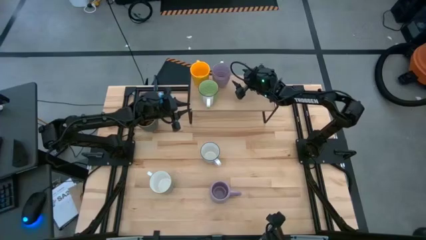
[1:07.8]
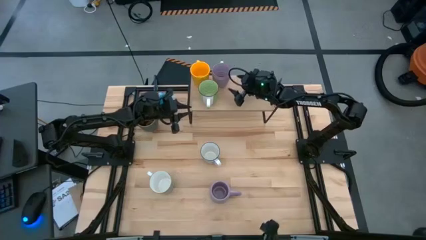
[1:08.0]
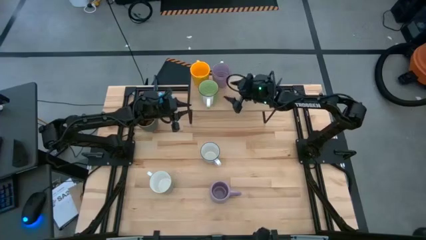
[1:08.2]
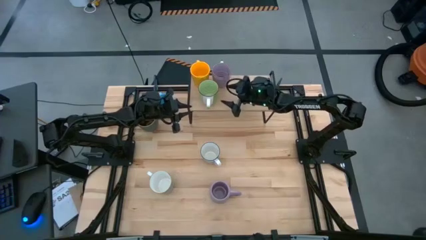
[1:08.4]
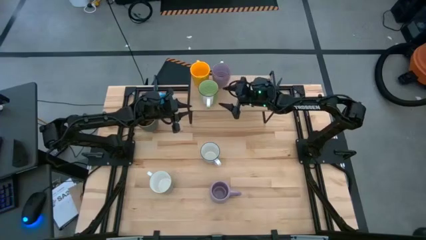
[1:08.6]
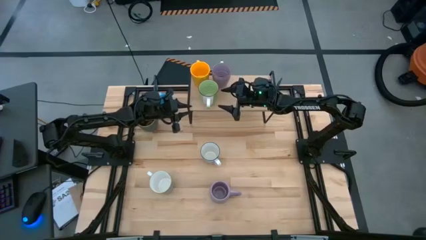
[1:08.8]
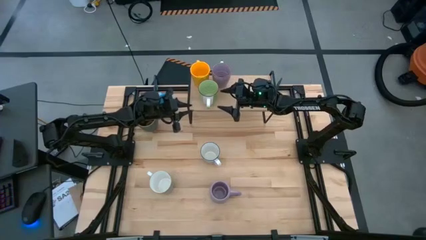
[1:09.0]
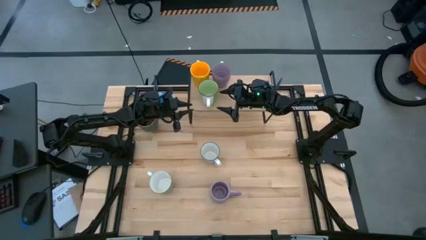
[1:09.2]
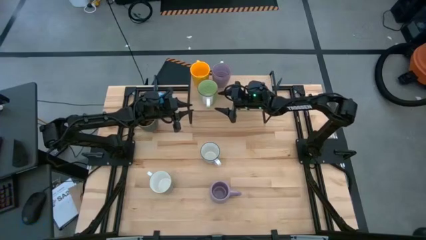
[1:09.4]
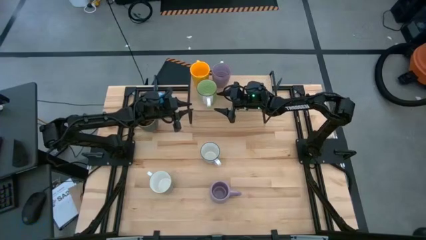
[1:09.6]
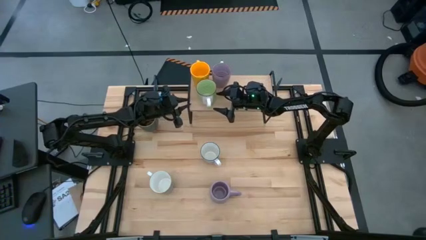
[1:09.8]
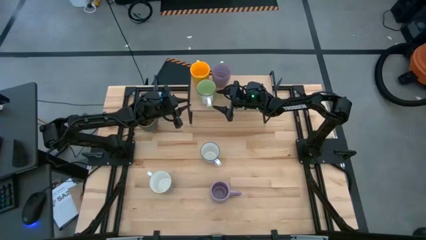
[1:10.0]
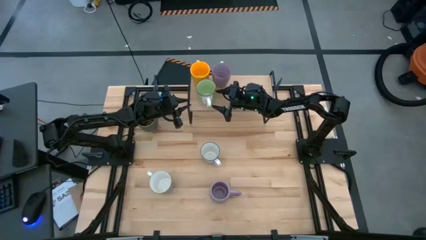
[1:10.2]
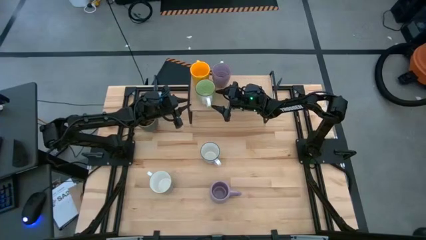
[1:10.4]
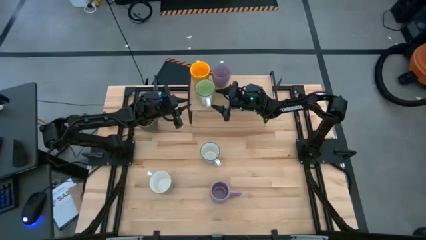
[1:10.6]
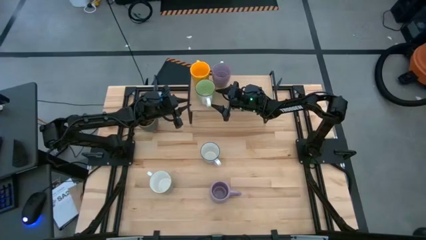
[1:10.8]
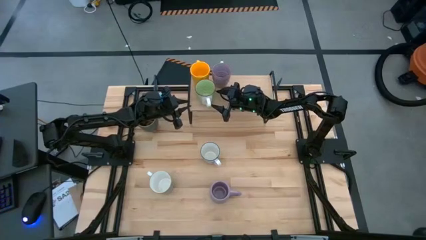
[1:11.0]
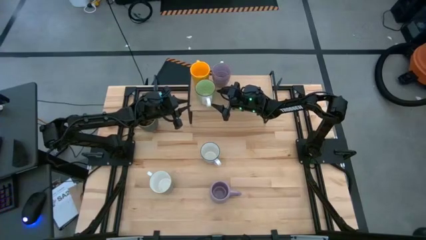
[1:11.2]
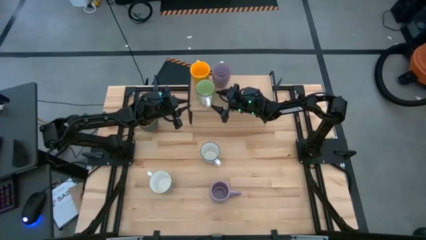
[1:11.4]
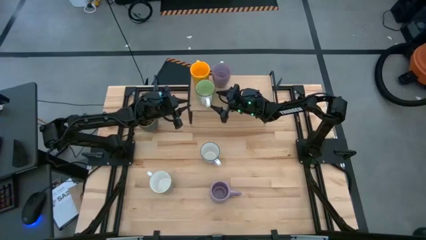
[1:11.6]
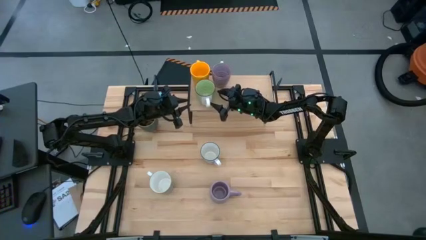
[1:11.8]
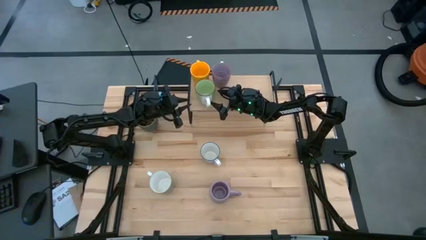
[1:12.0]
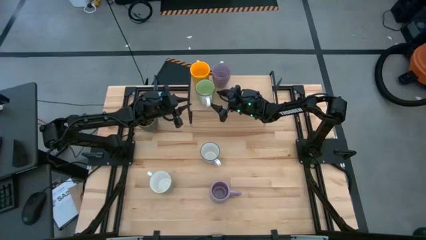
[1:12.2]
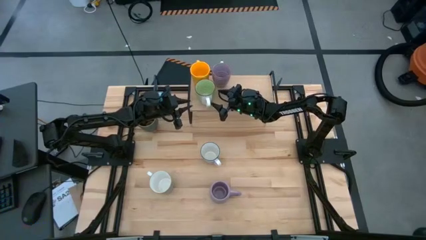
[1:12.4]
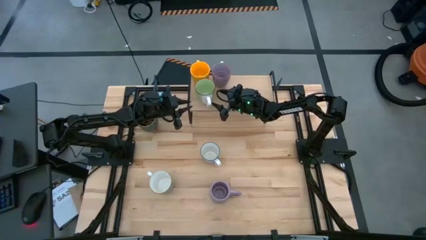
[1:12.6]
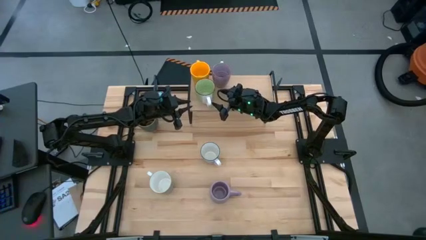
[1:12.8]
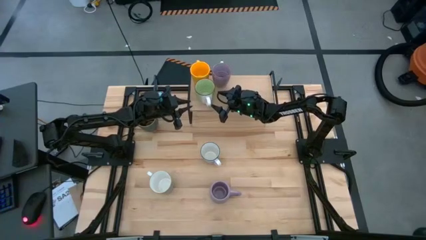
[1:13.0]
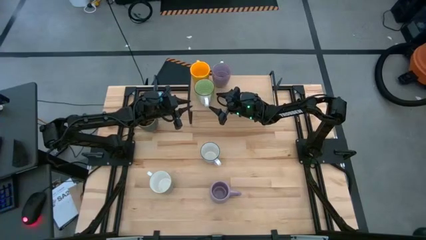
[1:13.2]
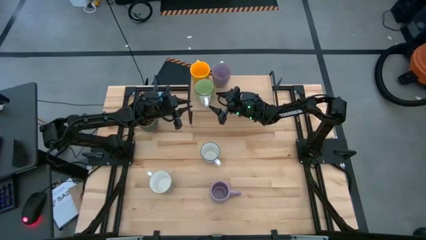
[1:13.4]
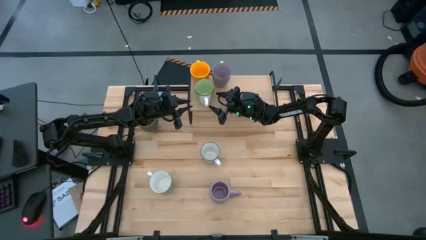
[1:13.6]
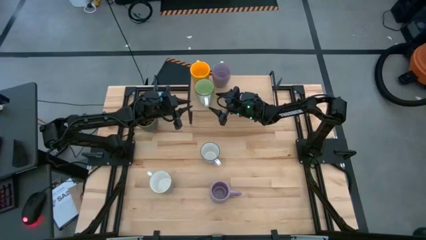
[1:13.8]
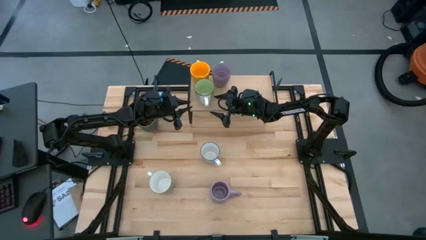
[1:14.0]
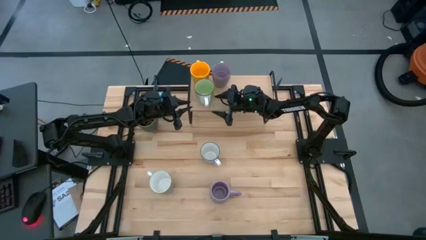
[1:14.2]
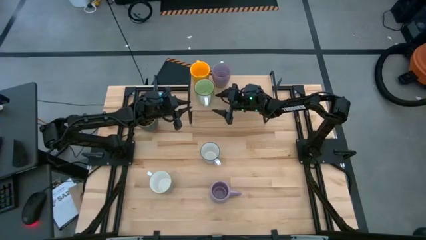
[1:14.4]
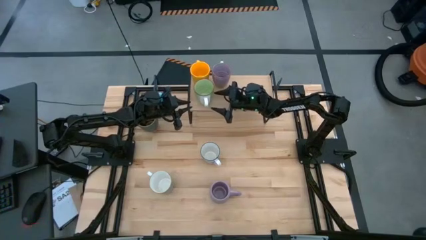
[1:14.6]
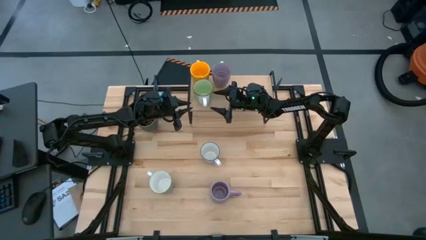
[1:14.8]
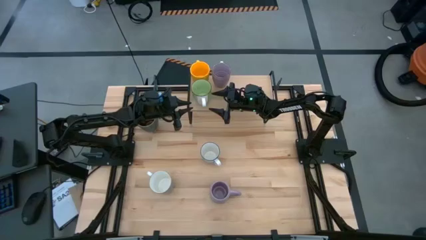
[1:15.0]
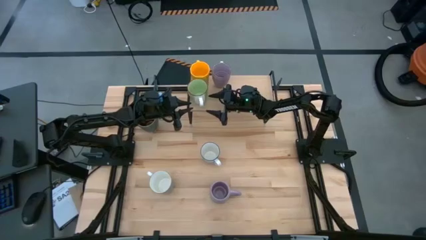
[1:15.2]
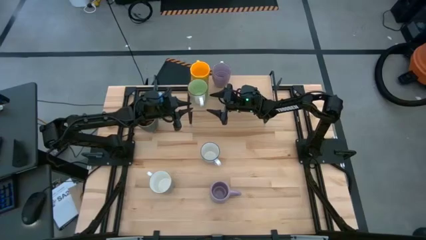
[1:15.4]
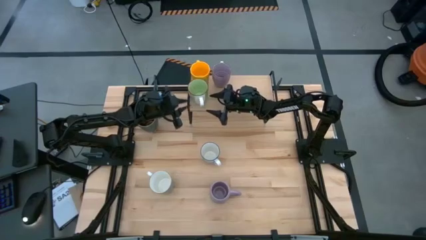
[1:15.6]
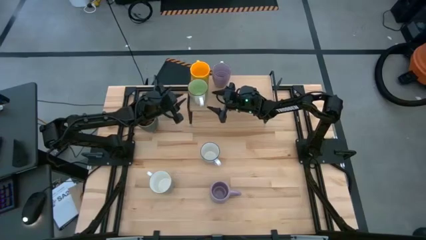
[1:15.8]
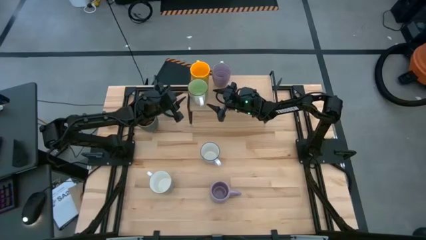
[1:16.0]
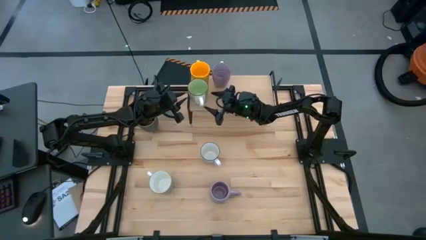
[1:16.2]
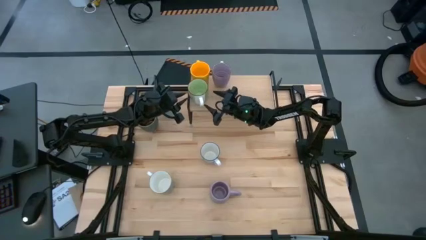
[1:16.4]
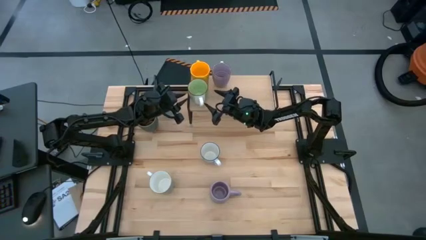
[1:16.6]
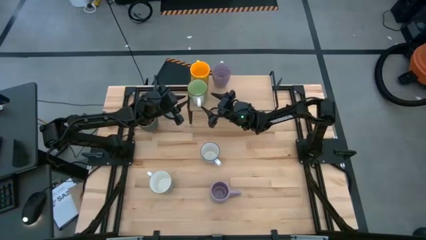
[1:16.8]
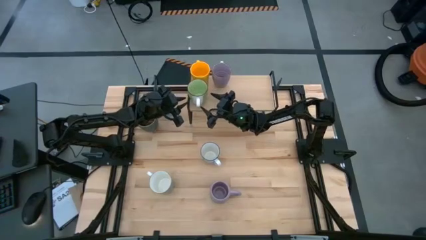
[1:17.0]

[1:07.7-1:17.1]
Task: Place coffee mugs
Adjust the green mug on the shelf

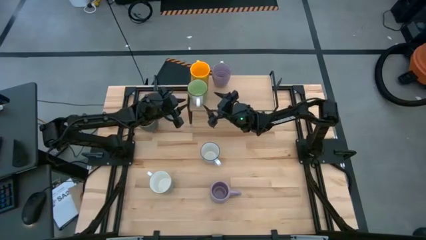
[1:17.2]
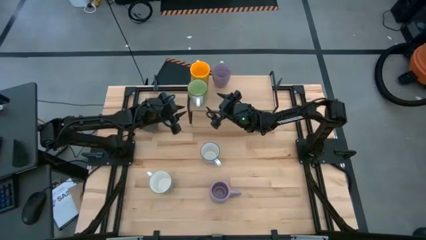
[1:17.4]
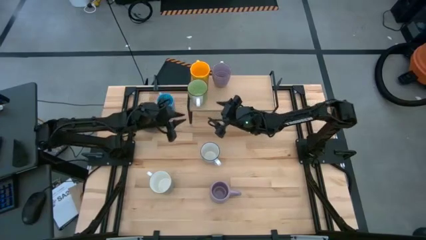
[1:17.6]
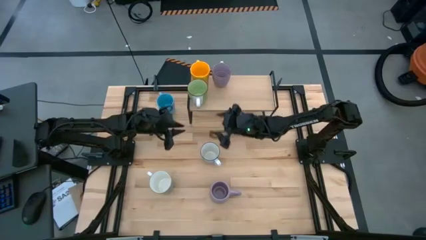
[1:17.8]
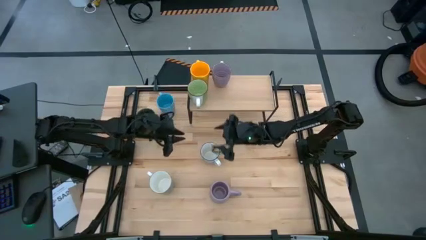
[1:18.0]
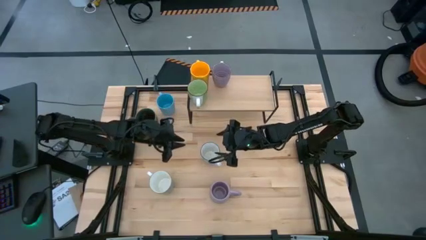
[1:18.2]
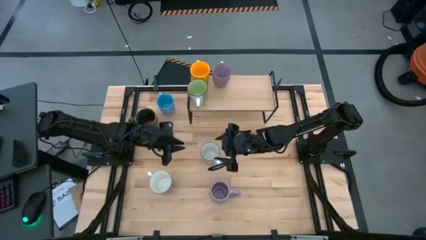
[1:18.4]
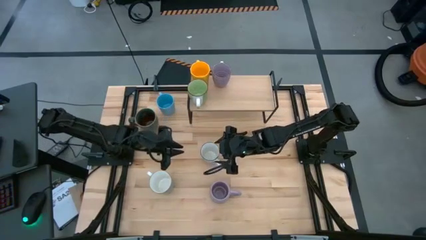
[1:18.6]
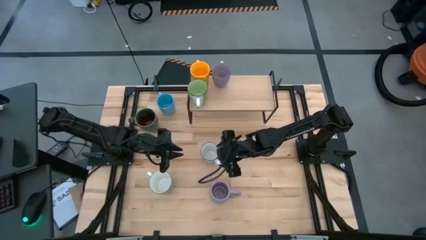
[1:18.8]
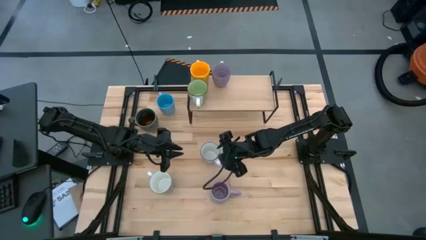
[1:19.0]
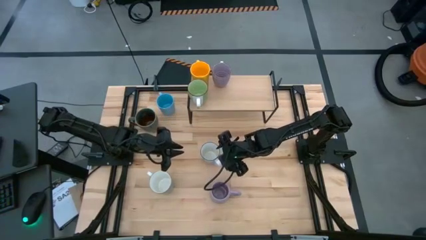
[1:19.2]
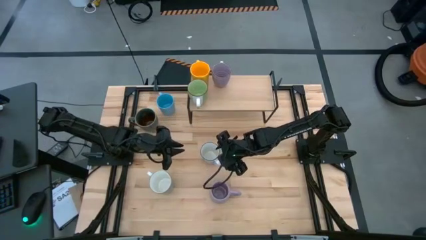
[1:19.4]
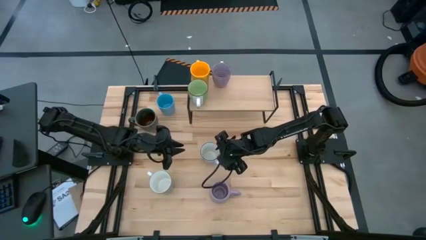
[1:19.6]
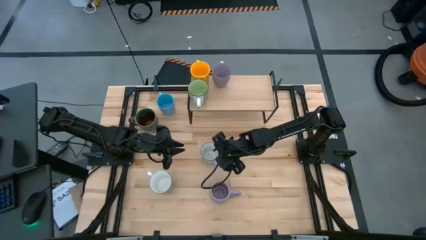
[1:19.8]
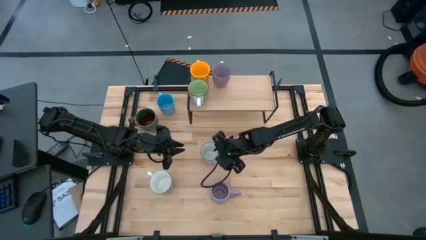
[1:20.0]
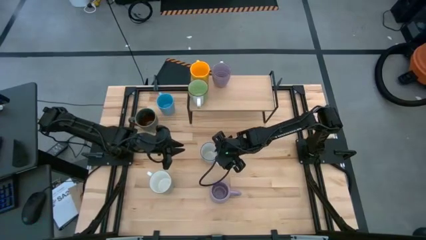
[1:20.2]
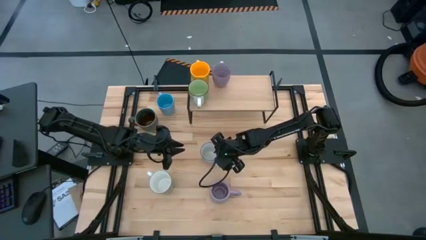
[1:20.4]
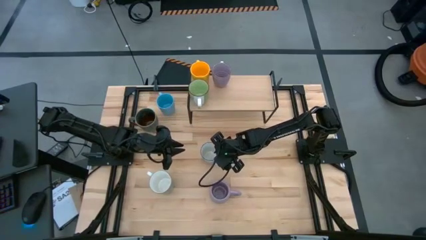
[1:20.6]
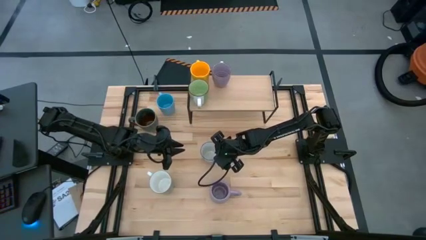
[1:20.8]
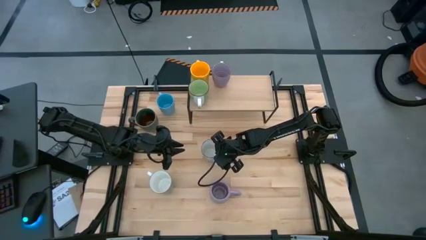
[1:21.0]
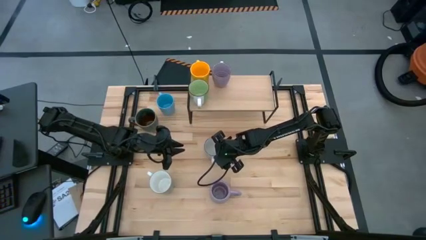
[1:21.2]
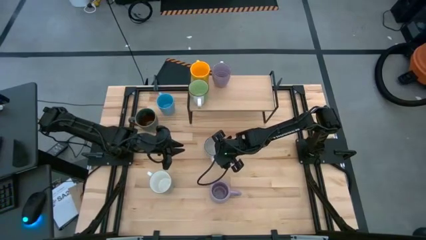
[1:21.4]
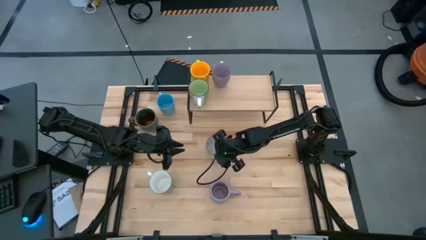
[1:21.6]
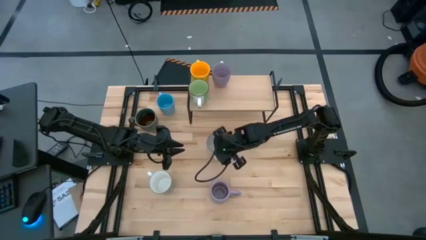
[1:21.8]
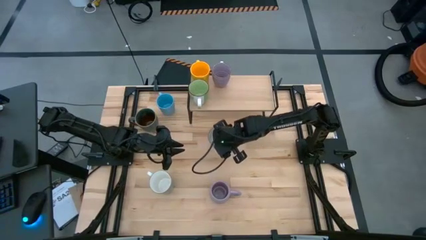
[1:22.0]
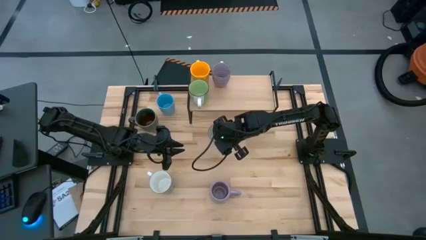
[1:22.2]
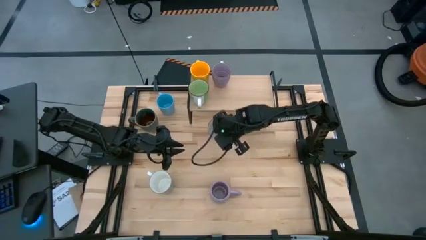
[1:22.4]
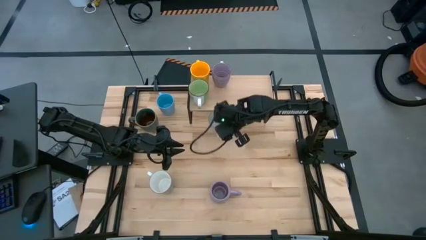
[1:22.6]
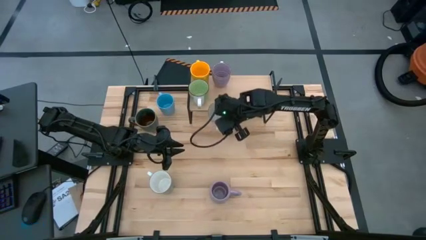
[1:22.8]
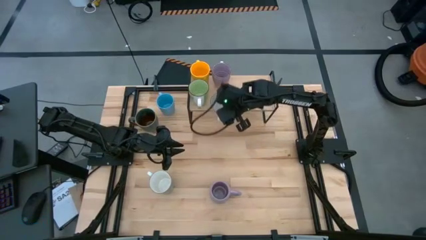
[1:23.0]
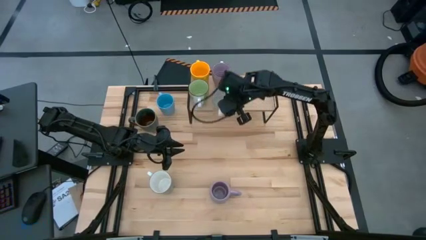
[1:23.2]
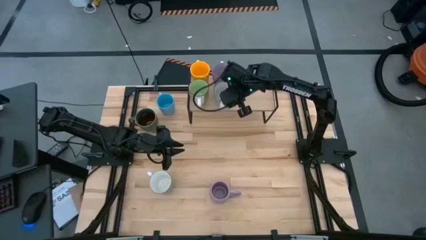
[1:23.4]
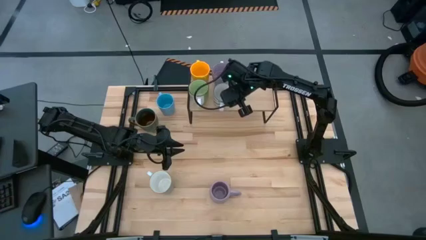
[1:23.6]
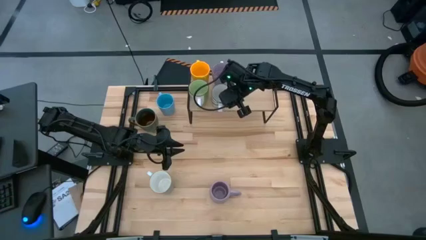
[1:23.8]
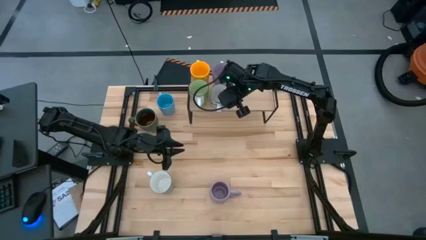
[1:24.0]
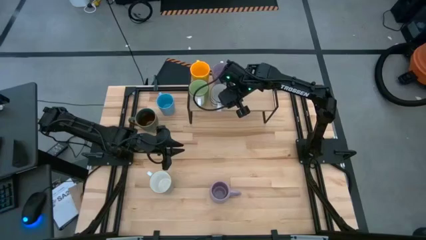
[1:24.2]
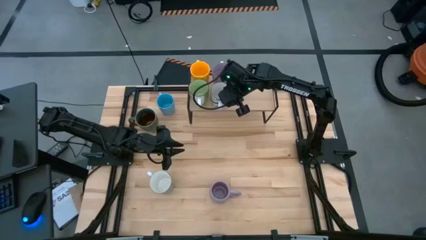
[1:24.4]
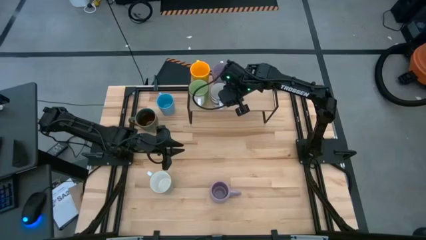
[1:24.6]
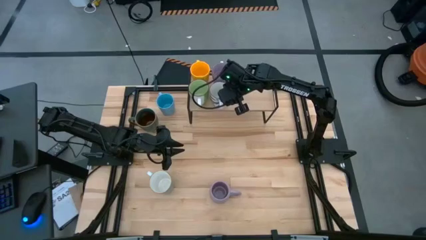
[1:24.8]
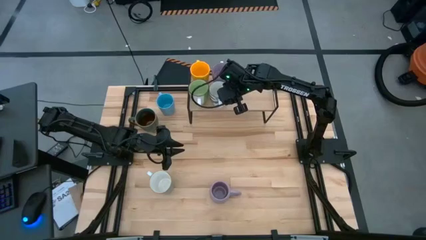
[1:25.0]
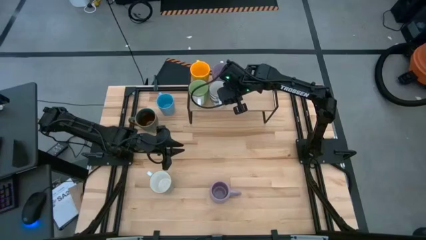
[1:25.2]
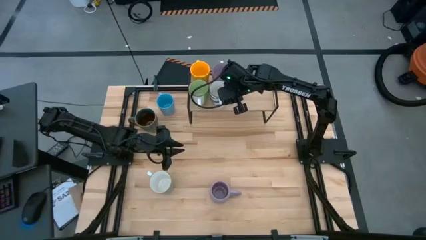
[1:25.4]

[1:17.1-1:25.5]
Put the blue mug on the shelf
